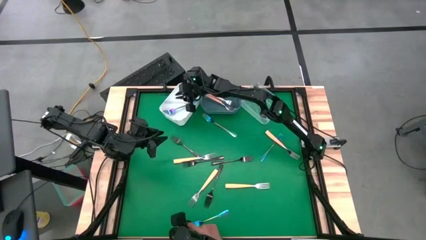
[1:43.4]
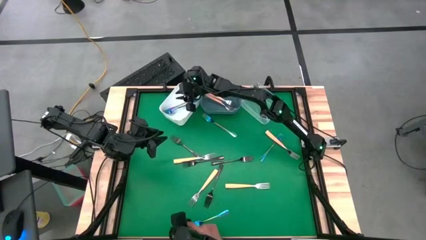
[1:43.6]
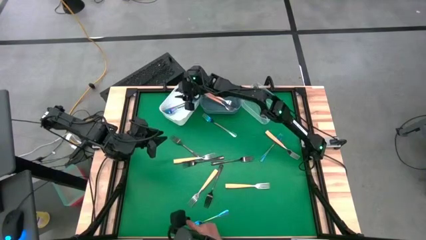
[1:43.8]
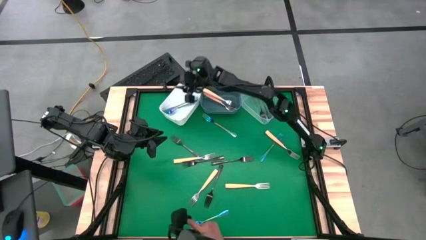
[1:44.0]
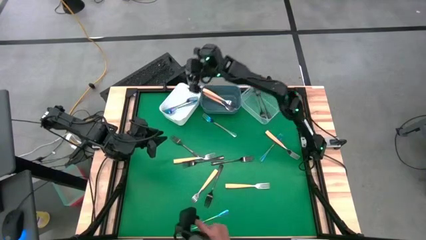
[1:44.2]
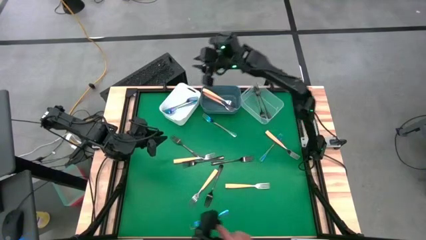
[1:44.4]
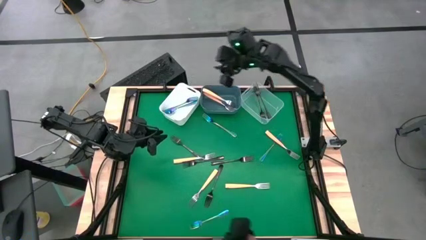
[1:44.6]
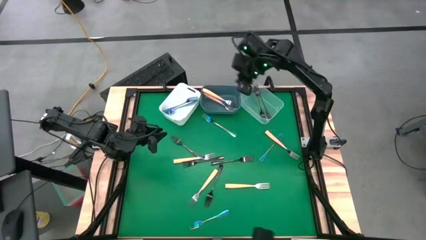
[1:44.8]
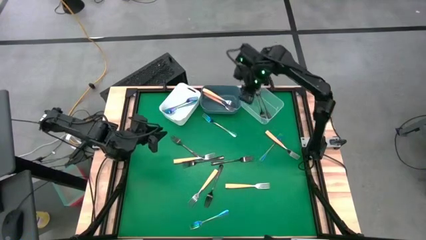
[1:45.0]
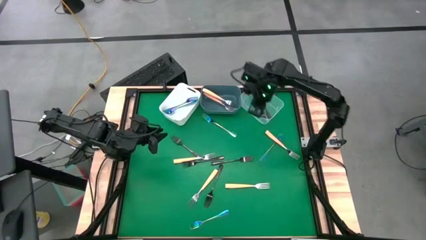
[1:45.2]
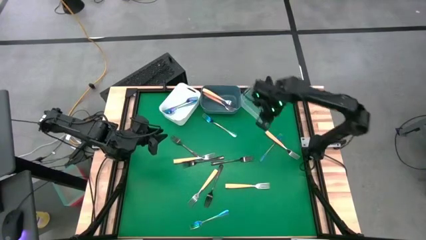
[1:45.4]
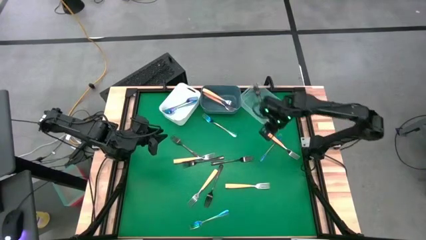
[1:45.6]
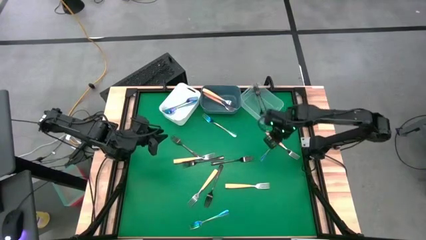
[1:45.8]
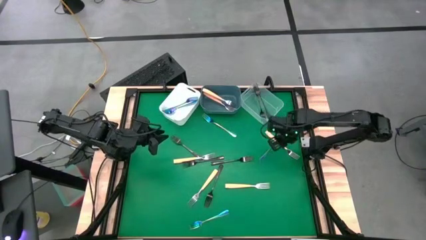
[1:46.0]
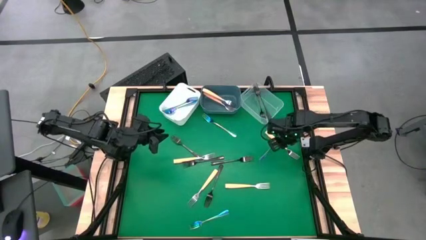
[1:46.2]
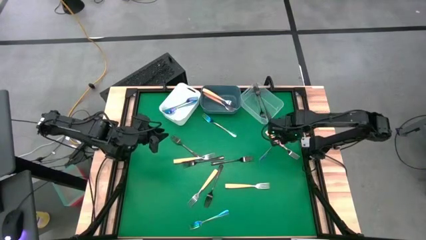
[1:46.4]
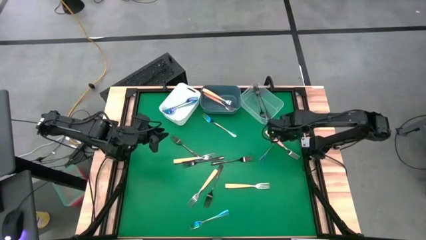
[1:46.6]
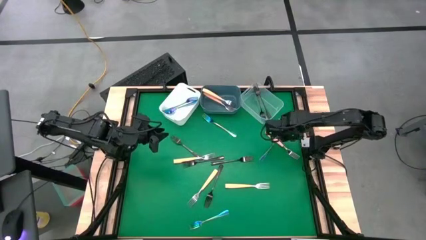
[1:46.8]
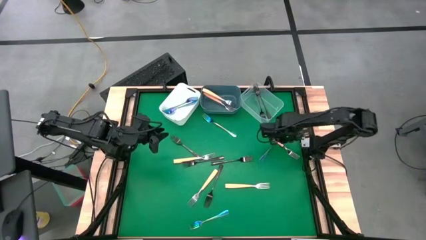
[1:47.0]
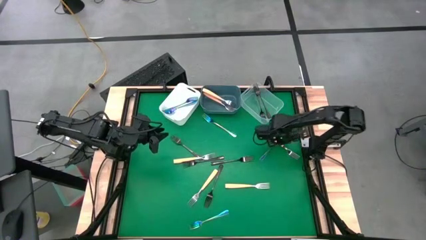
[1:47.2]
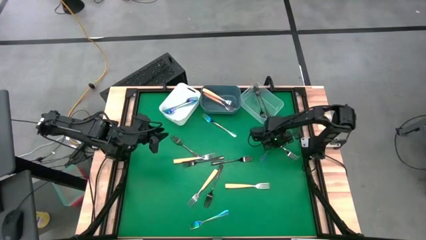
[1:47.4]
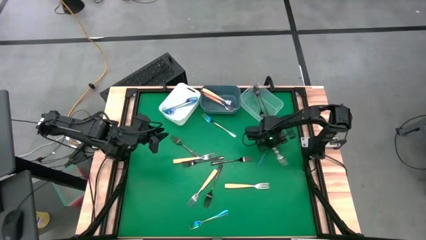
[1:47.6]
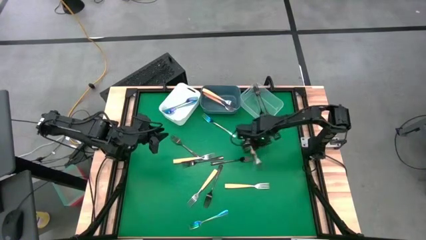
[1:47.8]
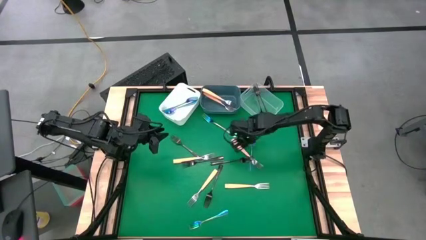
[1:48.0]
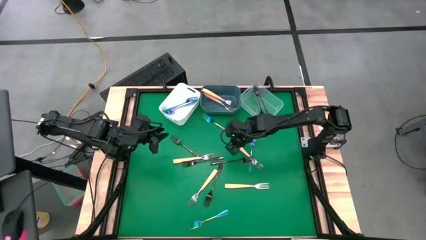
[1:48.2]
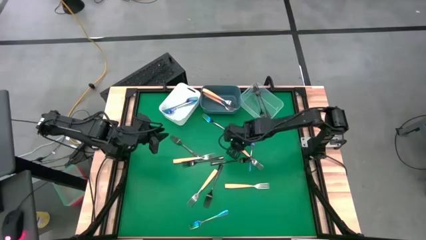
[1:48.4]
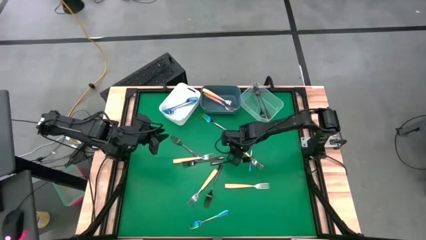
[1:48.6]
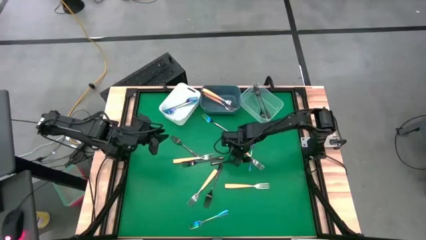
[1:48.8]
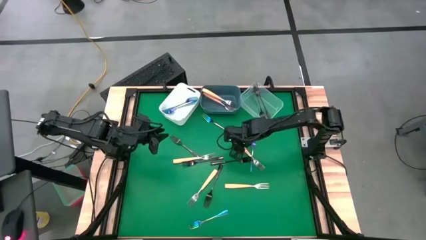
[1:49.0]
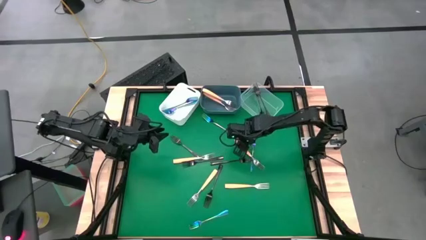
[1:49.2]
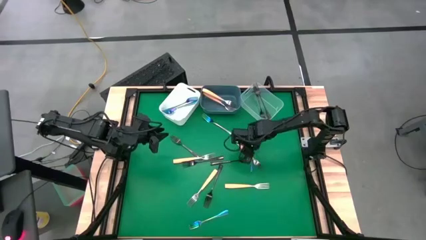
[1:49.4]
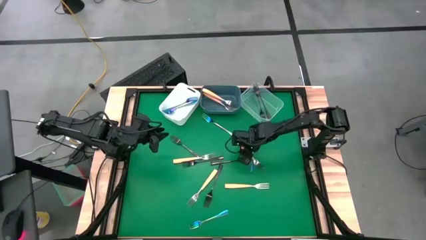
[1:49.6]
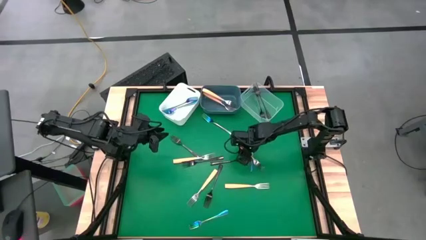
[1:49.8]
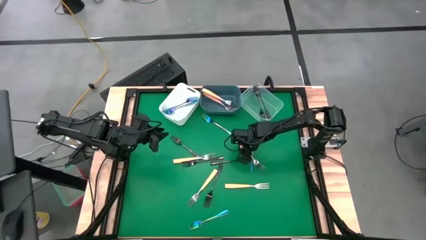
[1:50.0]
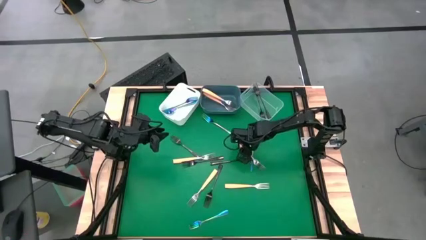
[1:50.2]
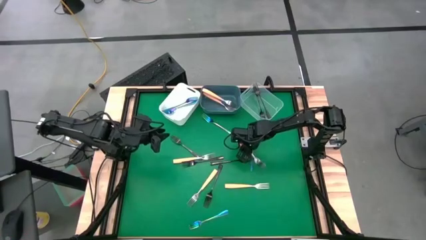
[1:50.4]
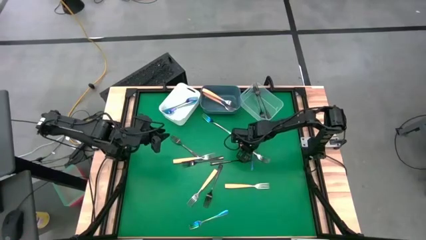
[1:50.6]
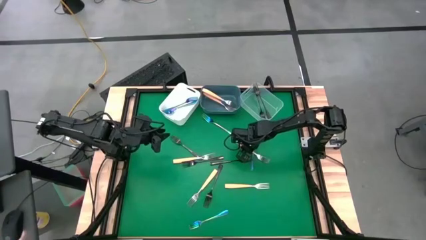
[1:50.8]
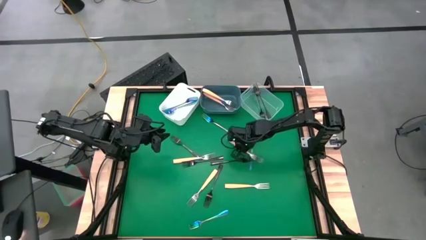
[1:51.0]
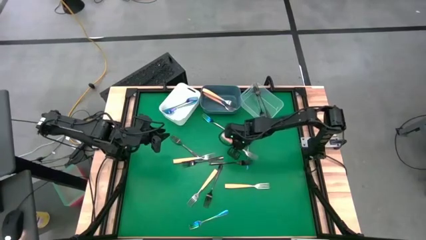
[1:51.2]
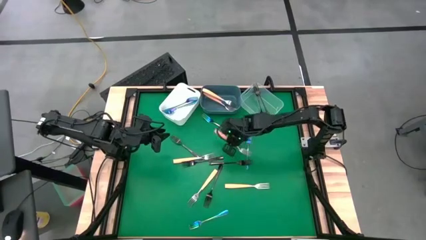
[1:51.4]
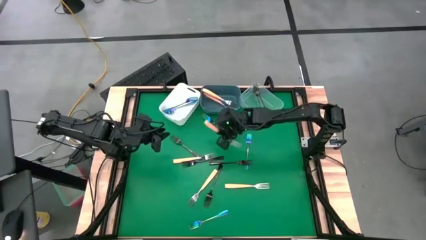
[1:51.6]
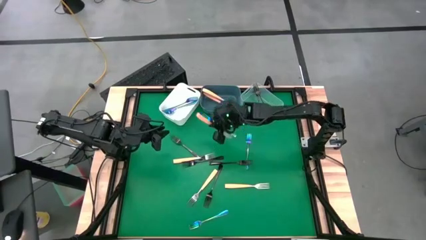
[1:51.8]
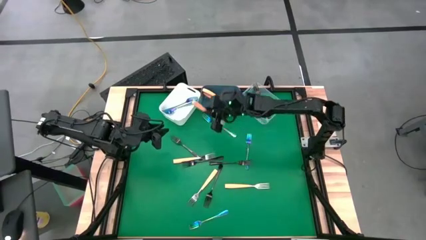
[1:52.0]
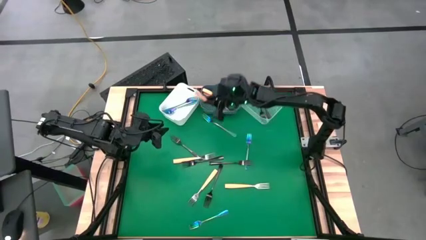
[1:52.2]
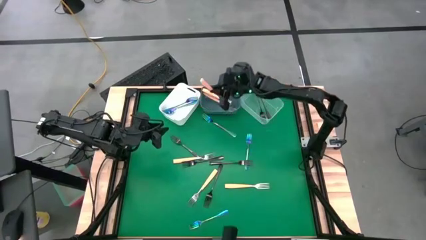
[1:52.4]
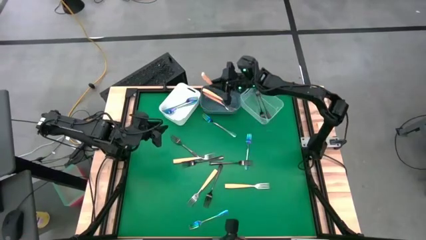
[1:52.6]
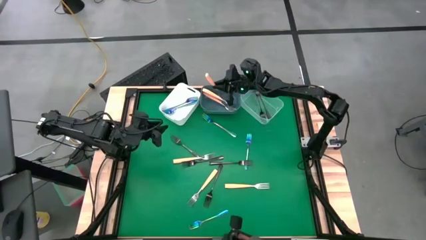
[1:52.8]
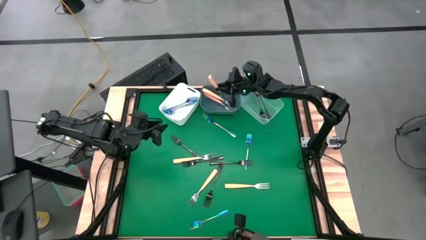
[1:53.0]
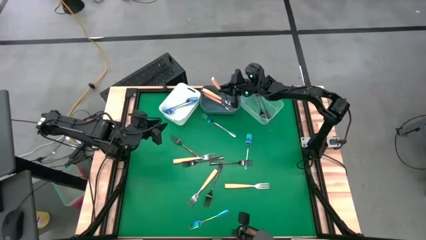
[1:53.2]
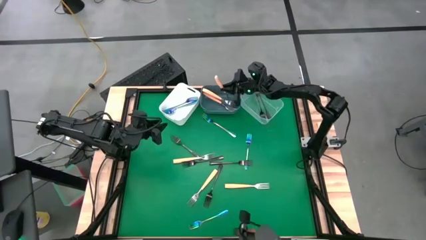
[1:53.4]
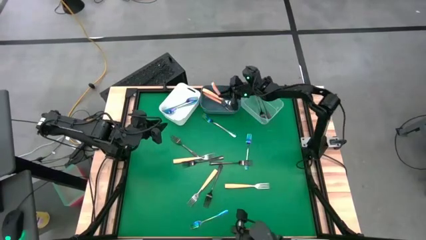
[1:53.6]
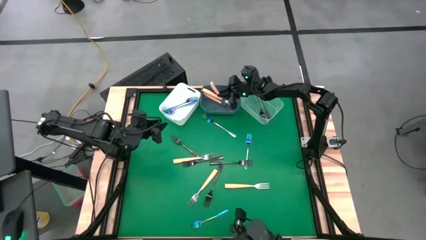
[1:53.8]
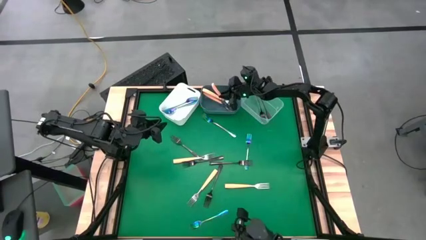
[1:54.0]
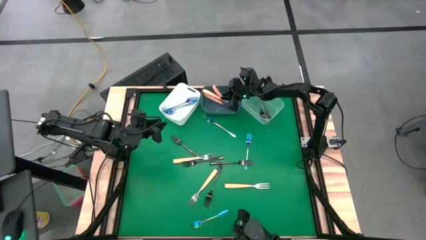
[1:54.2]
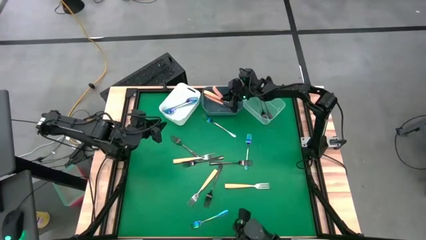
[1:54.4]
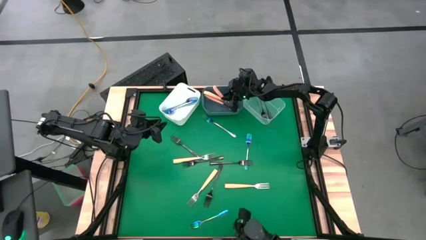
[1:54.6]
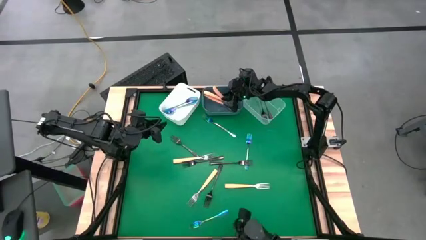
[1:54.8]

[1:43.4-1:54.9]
Task: Sort silverware by color (type)
Put the yellow fork into the blue bin

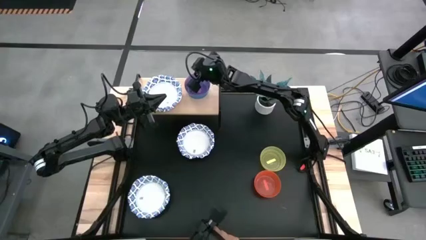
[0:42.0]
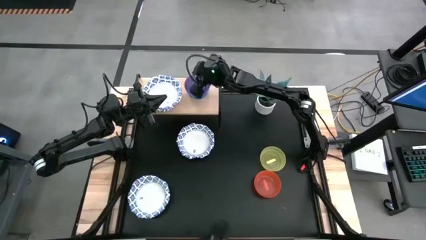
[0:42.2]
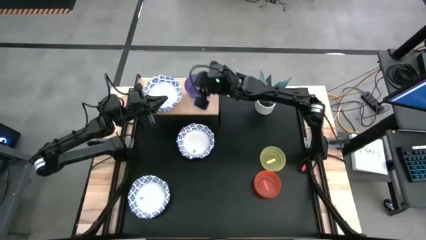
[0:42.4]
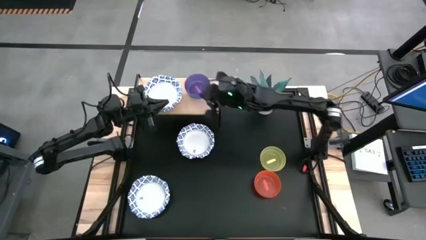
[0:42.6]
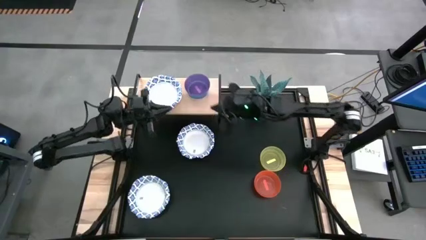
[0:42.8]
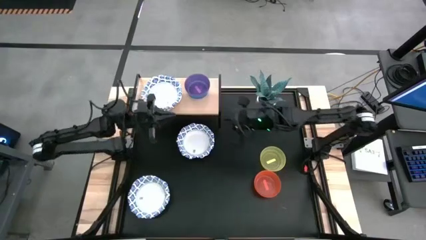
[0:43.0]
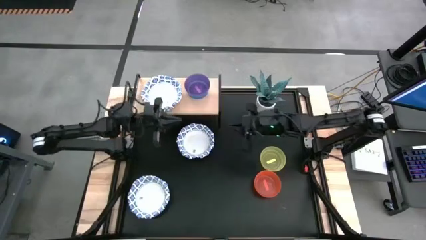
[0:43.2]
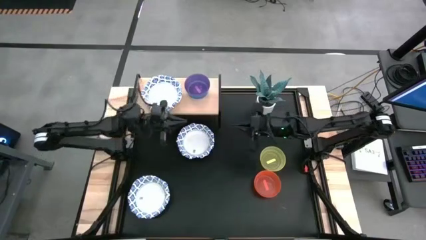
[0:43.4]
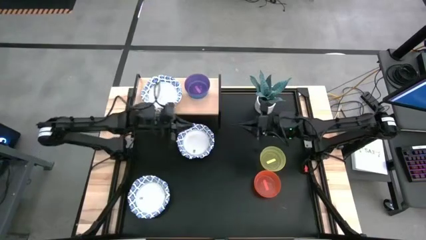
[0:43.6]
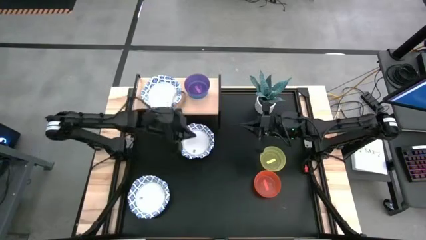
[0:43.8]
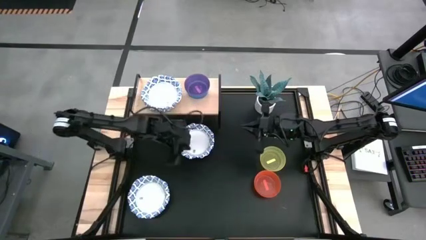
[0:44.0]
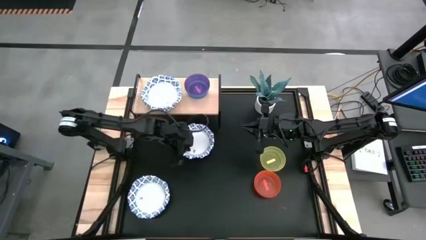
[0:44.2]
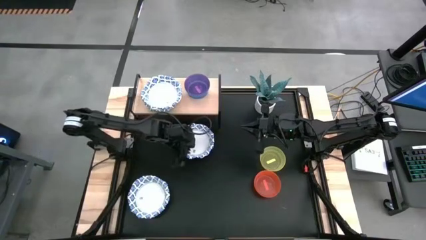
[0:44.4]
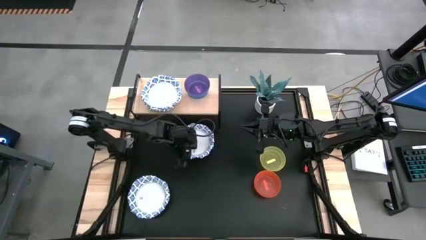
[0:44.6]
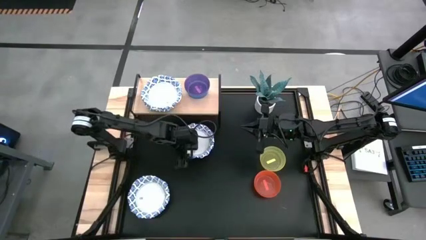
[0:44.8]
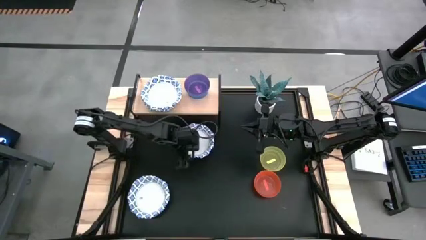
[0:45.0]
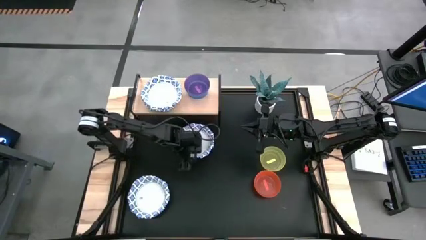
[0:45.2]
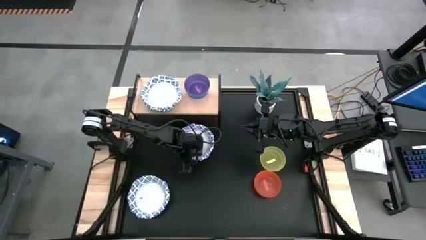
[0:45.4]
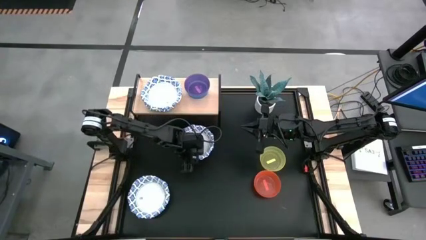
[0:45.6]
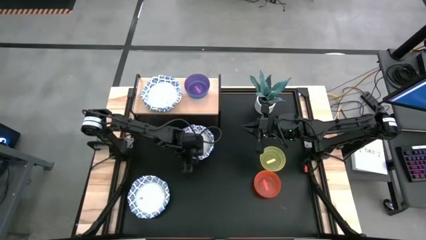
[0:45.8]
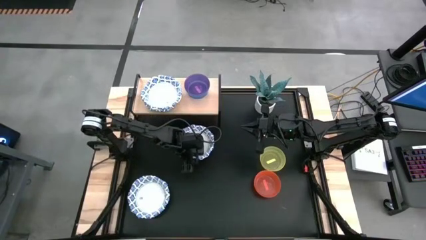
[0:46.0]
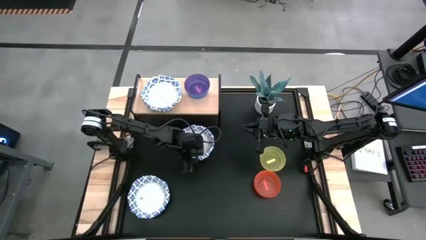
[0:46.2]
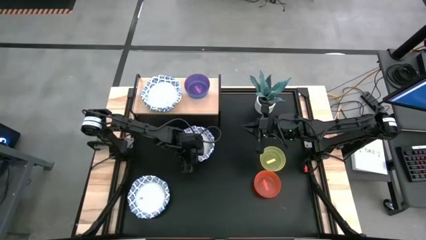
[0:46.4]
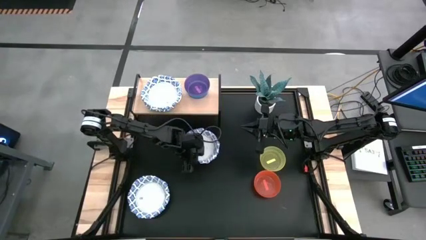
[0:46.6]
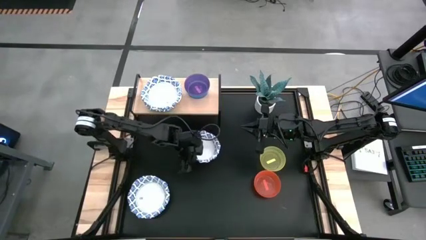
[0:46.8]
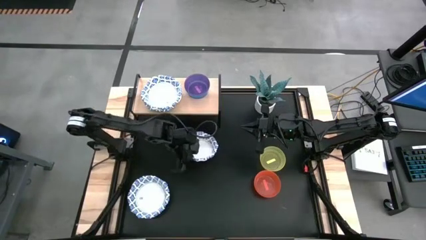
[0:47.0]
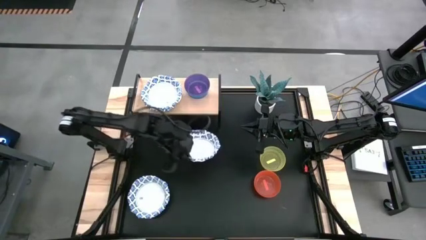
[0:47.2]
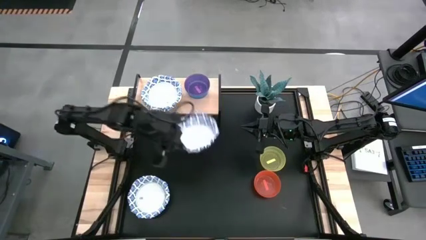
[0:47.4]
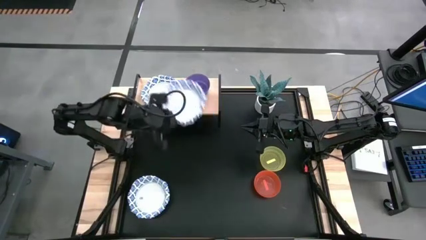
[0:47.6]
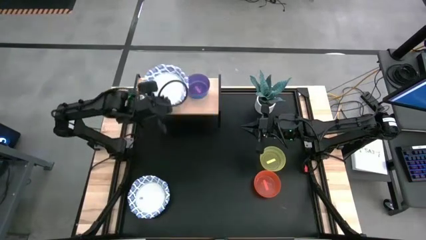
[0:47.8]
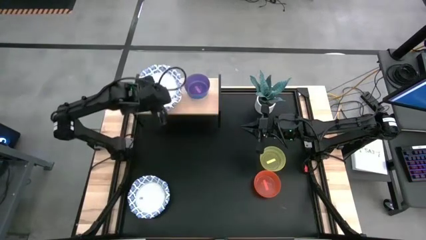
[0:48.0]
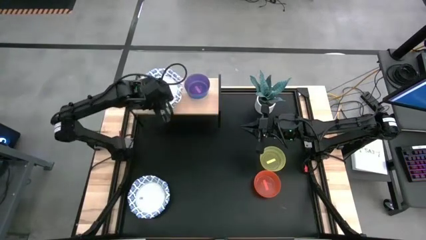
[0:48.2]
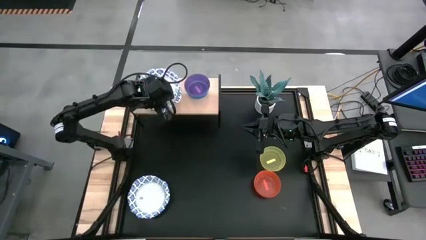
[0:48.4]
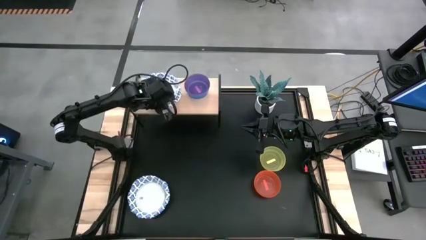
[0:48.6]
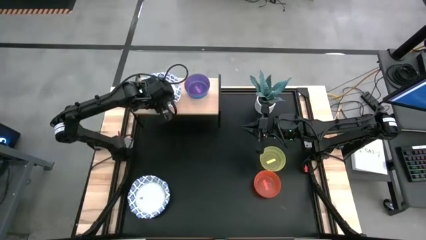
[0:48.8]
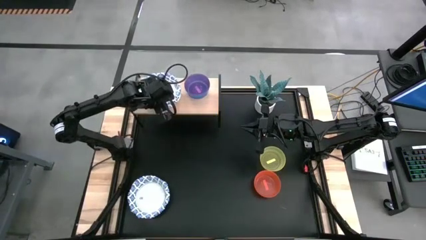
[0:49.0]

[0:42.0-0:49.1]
Task: Place and stack bowls onto a shelf
Stack the big white bowl on top of the big white bowl on the shelf
